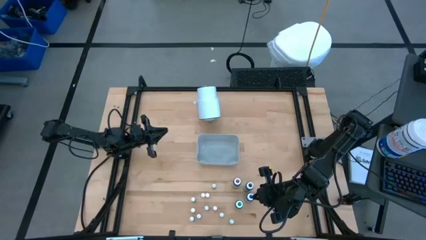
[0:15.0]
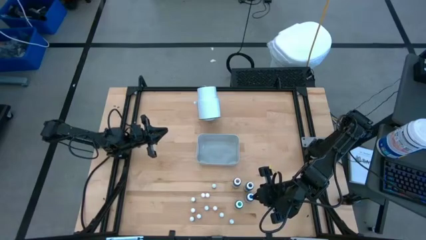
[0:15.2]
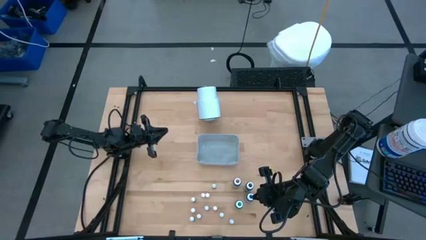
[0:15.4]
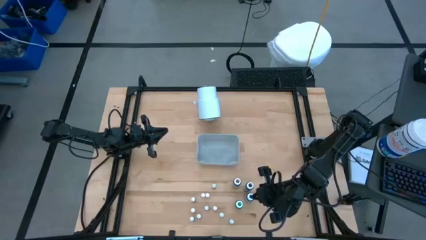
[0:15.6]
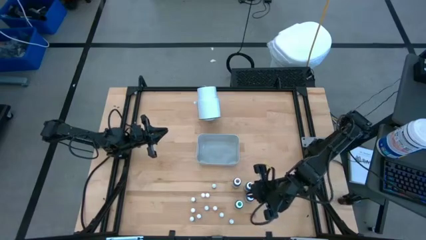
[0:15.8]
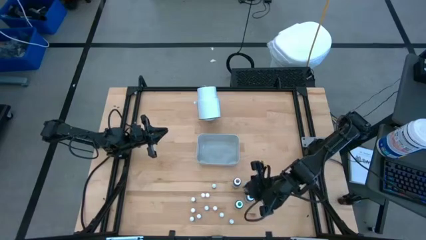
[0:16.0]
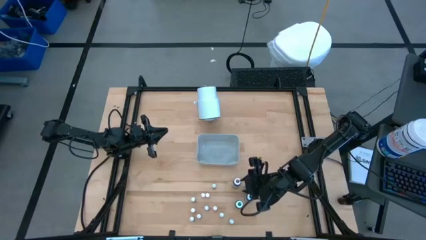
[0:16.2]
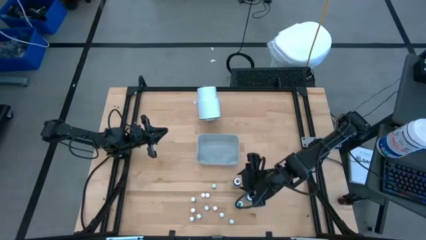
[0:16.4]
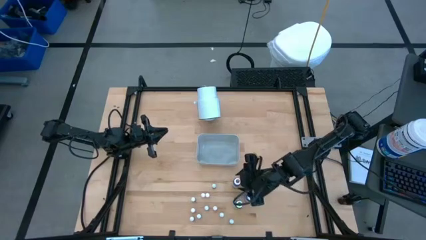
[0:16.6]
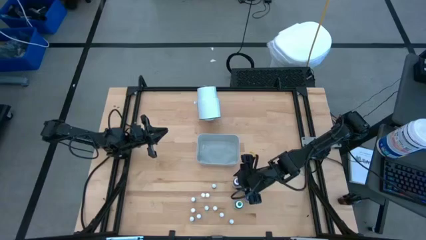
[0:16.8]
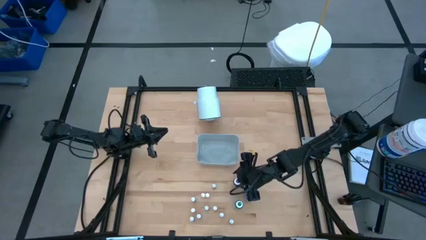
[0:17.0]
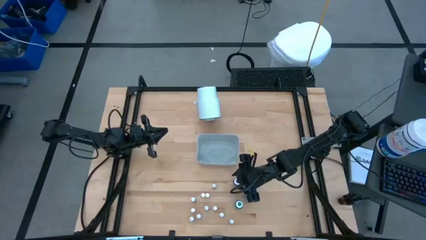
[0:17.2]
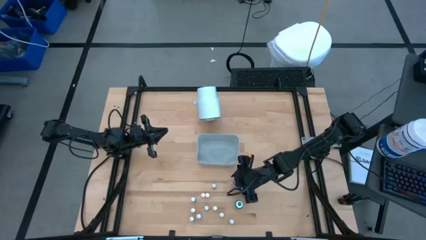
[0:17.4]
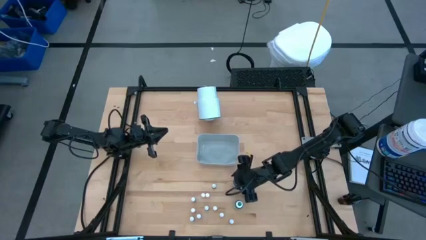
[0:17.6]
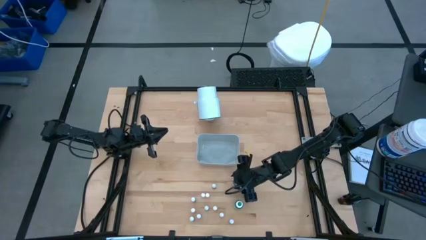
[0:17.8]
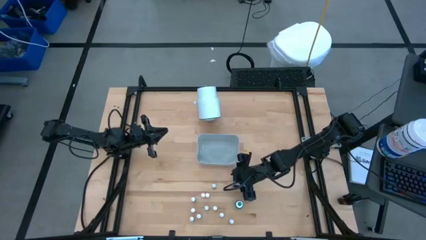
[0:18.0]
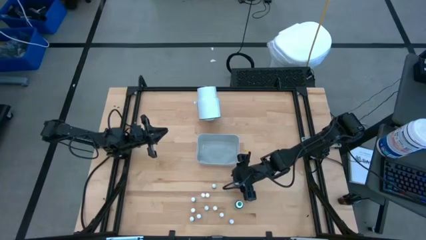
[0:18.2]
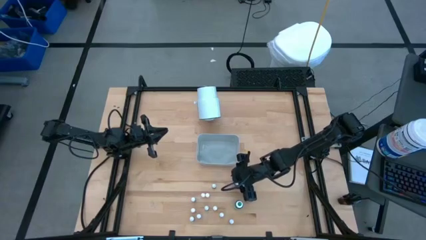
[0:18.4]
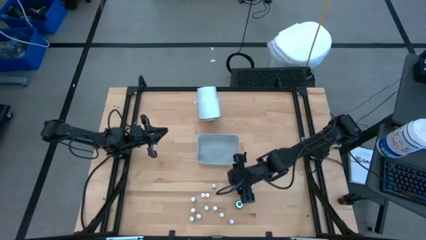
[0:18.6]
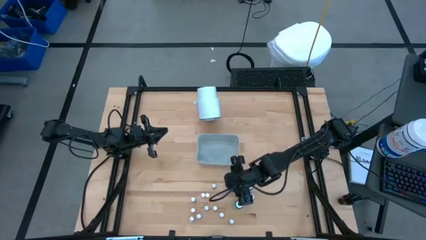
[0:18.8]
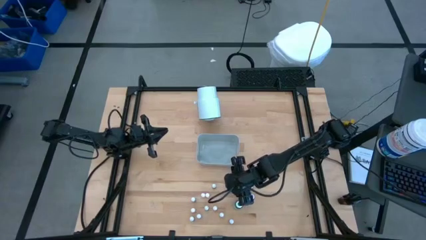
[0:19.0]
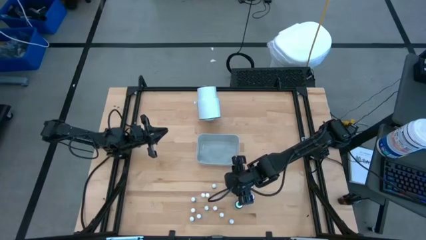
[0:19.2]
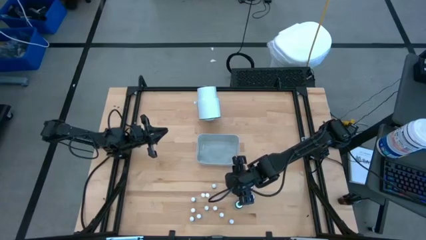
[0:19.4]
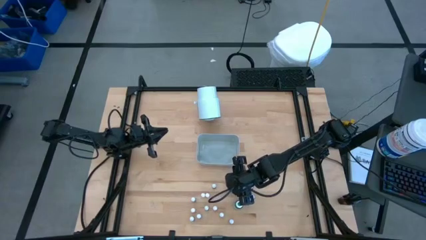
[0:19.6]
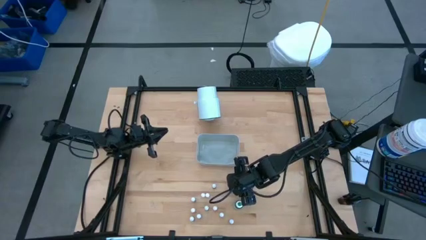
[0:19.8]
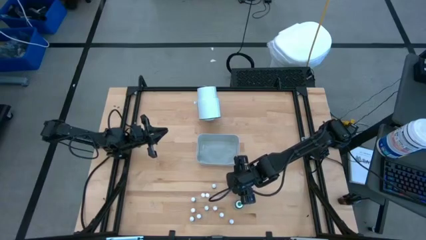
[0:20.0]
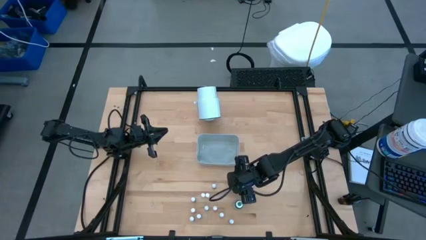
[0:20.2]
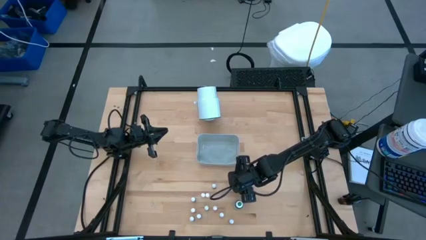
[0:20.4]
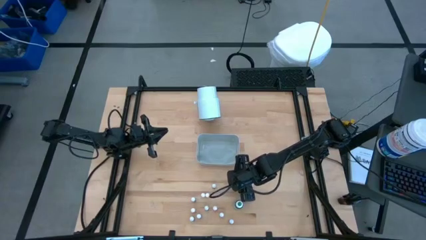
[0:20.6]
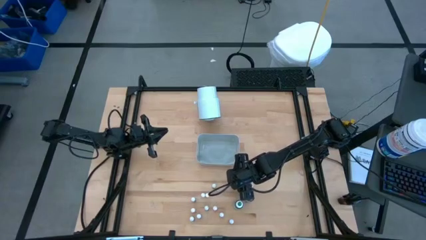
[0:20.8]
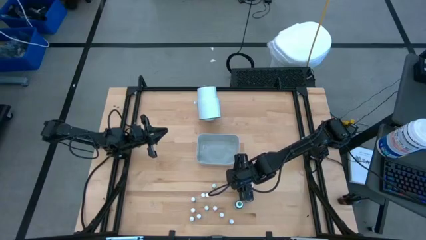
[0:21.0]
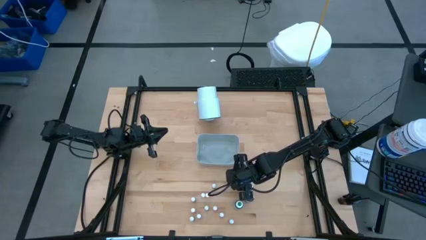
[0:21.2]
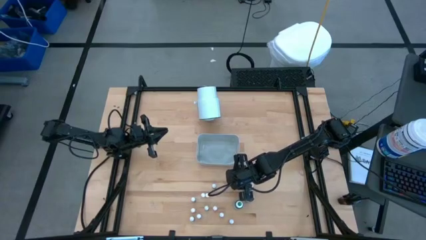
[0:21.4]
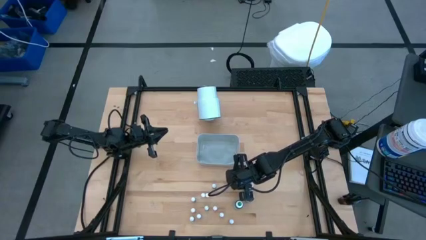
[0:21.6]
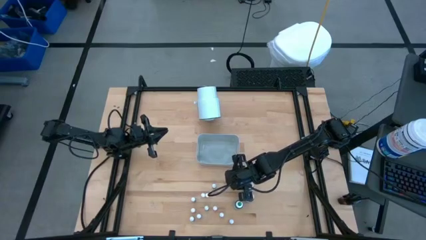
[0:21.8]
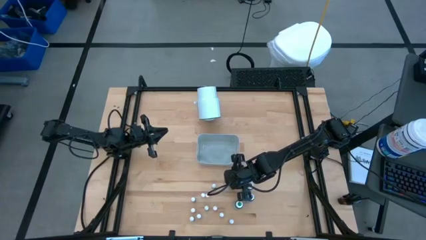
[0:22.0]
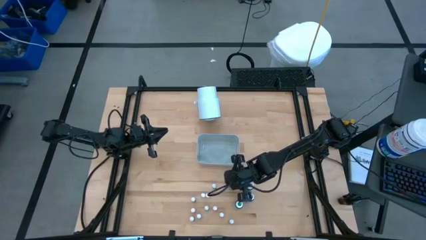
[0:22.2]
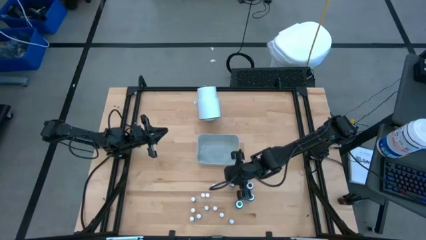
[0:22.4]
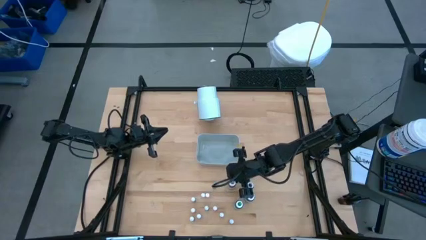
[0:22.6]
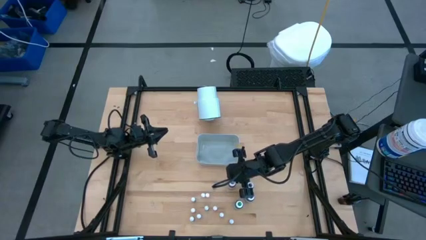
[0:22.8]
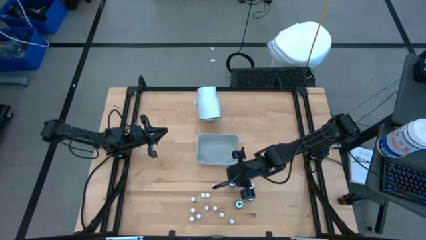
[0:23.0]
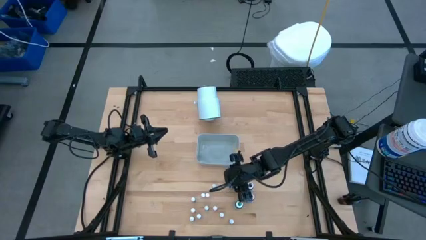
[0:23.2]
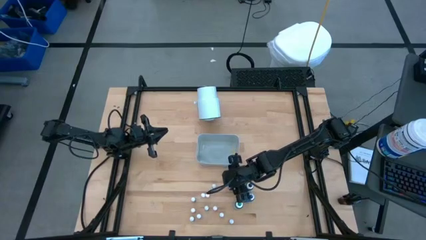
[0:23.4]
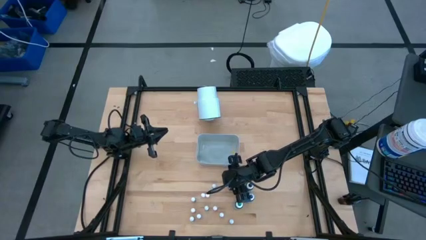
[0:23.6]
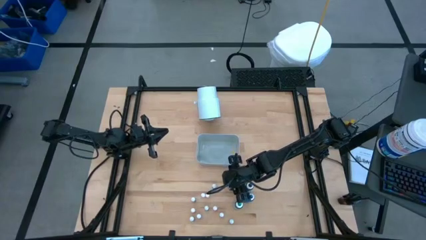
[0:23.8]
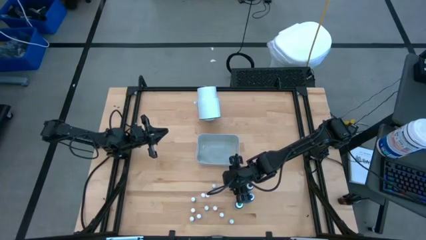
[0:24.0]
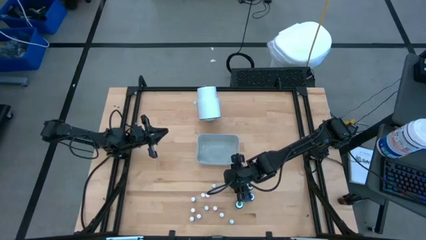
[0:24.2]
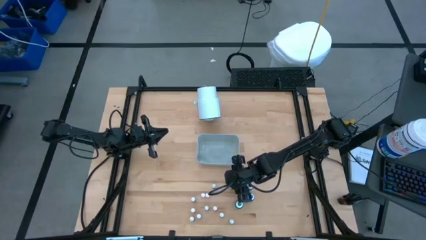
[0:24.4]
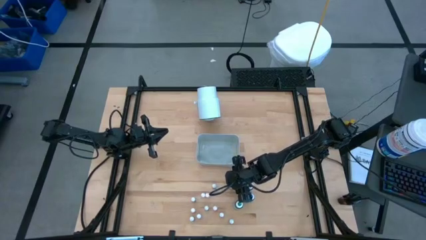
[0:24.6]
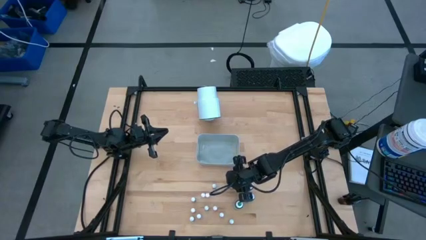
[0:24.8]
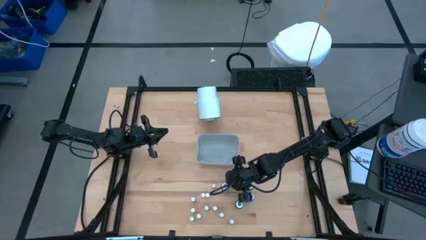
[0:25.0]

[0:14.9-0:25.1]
Task: Pick & Place food coloring
Put the purple food coloring bottle into the gray bin

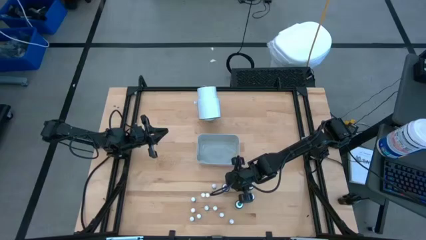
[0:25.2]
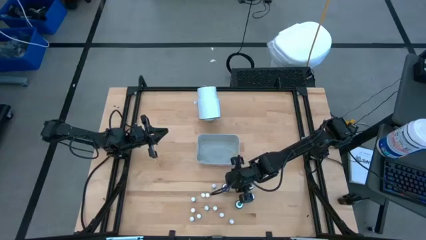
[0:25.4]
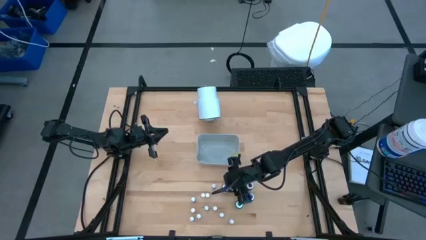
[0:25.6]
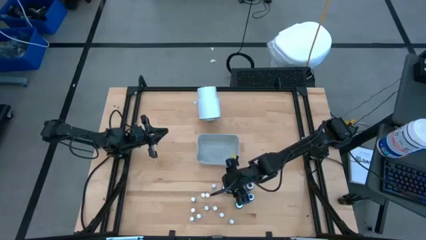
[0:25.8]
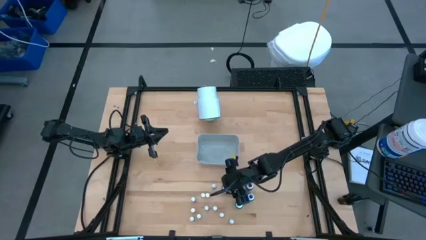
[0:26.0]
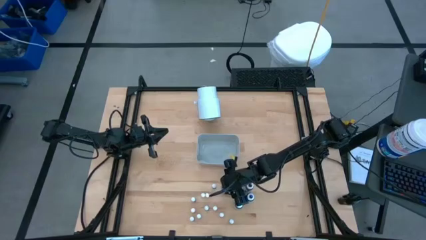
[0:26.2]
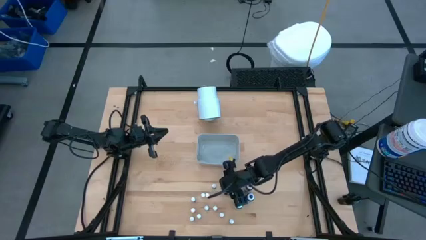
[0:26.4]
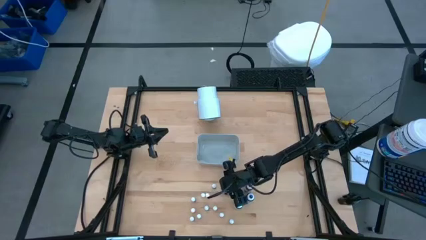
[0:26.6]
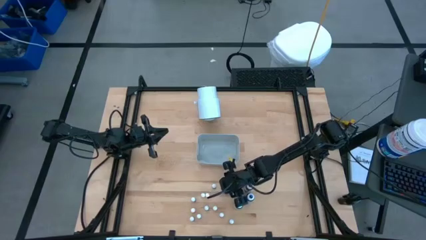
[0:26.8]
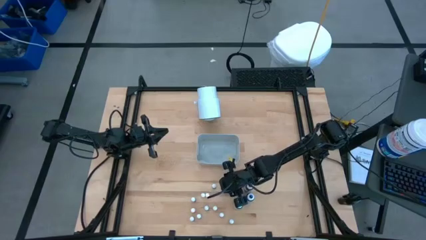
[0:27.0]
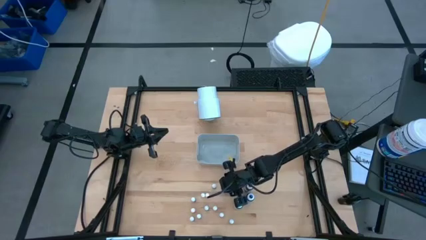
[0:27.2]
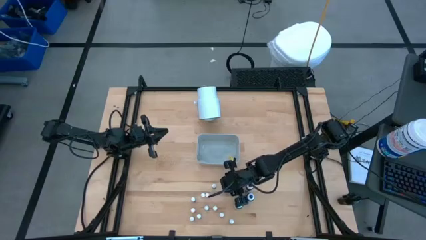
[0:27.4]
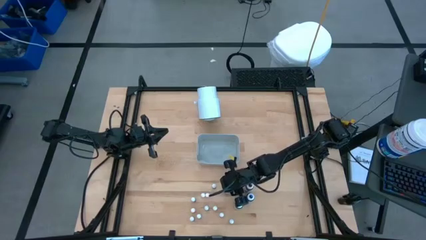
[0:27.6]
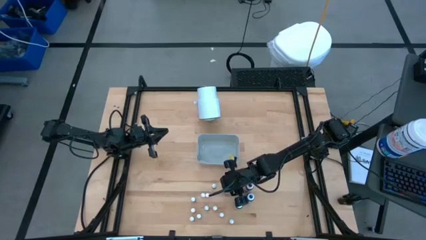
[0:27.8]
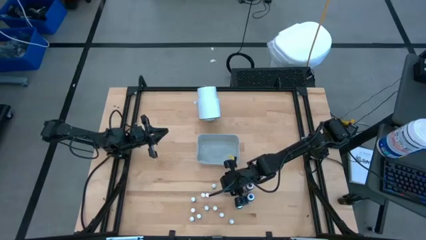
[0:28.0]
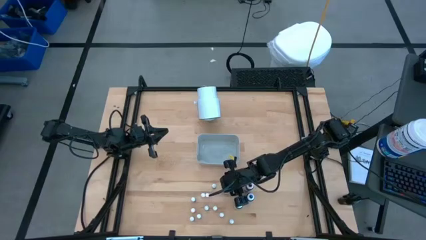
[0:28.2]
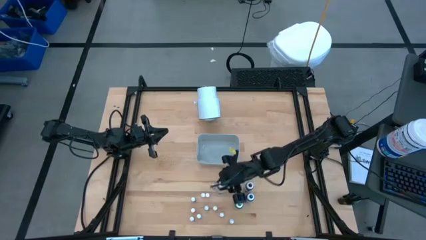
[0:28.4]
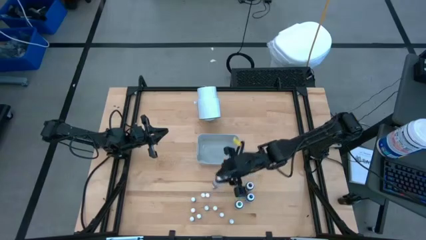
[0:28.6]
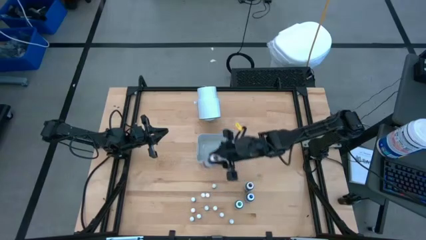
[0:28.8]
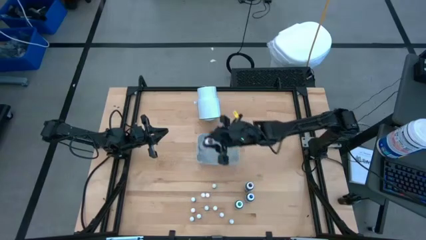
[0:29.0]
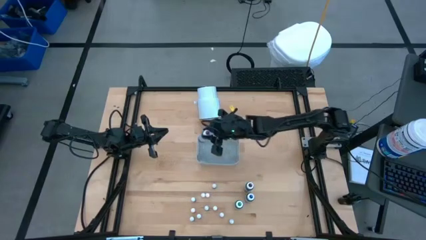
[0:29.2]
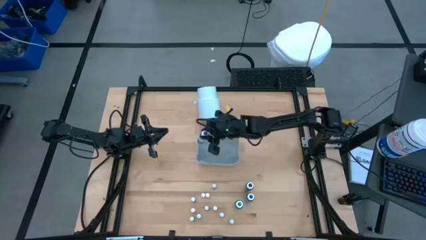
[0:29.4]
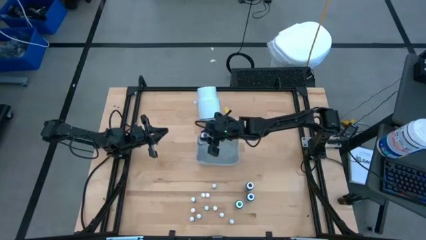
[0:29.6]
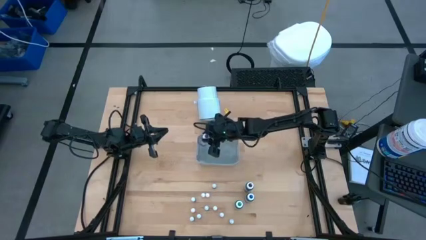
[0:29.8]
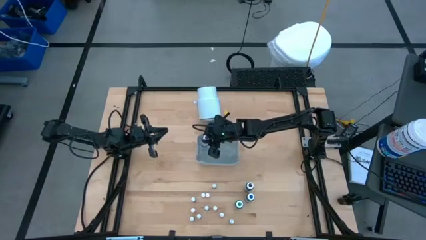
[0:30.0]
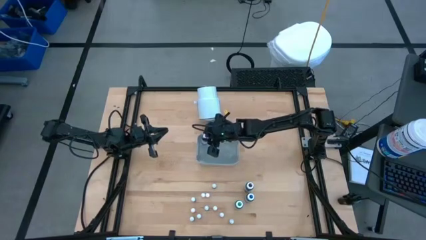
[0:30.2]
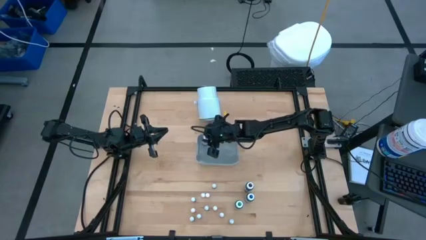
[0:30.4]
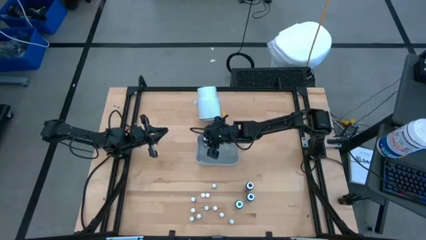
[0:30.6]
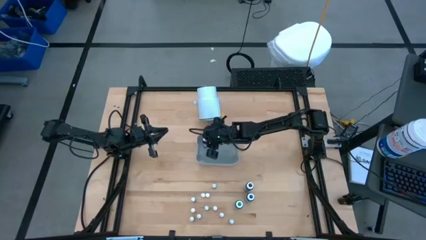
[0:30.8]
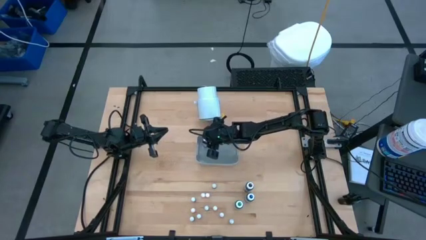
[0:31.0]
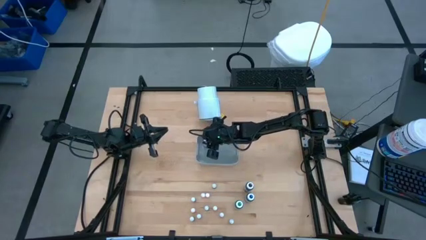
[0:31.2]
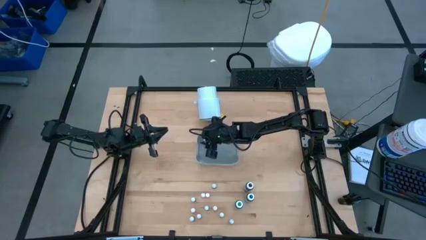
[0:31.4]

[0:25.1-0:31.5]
Put the purple food coloring bottle into the gray bin

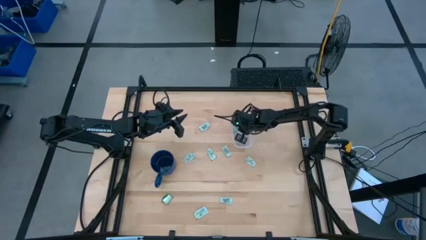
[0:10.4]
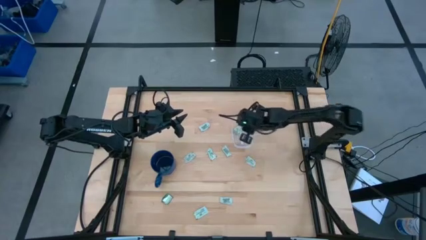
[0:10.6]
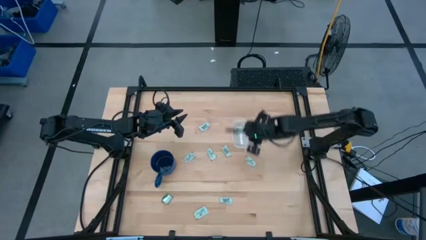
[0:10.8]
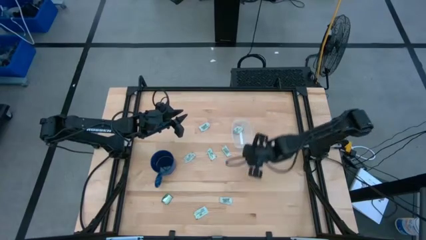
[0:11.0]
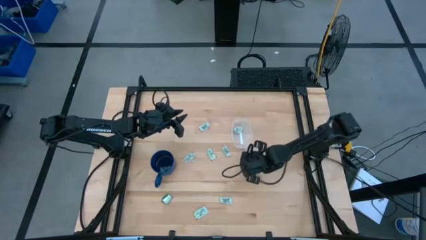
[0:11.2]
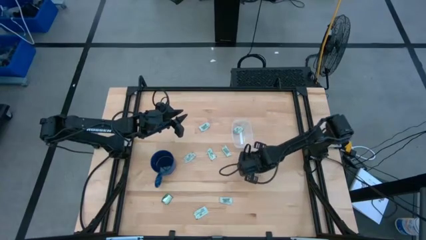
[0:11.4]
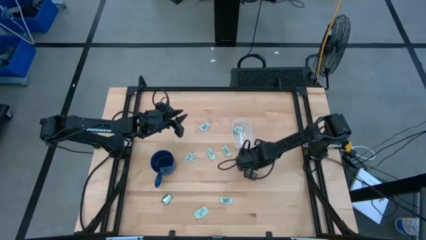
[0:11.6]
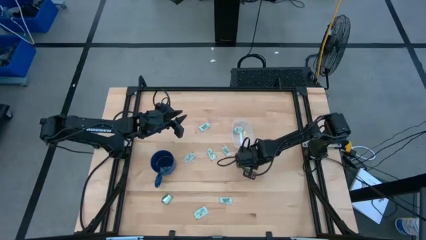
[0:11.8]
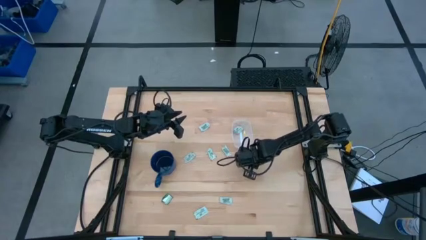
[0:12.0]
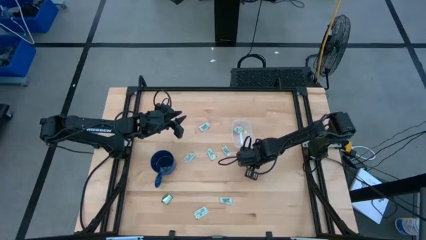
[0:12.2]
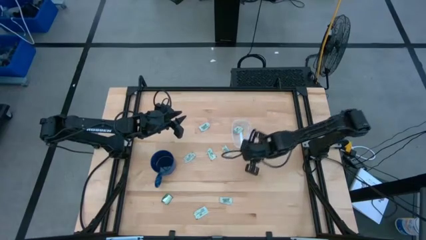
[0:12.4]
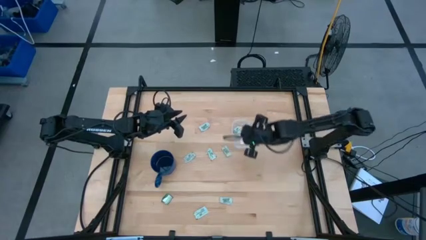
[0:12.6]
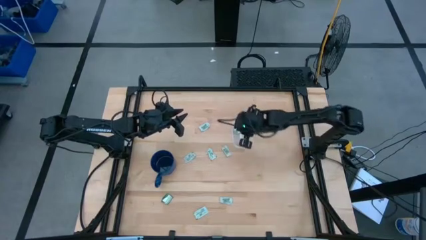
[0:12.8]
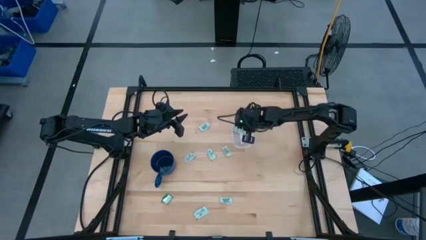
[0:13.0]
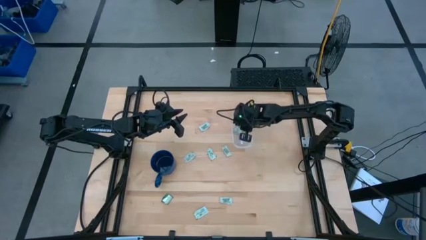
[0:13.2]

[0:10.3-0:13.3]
Task: Pick and place Stevia / Truvia into bins
Put the light green stevia packet into the transparent container
